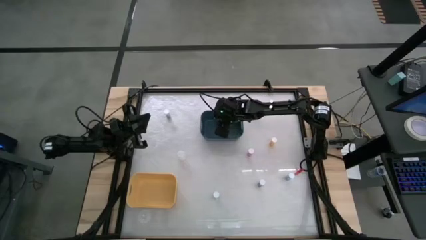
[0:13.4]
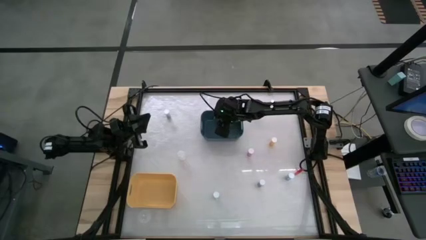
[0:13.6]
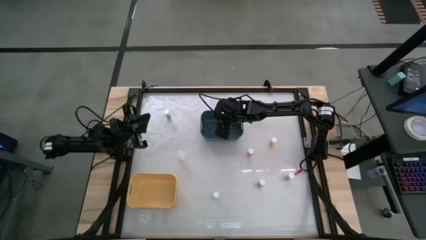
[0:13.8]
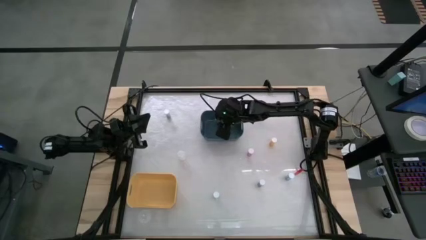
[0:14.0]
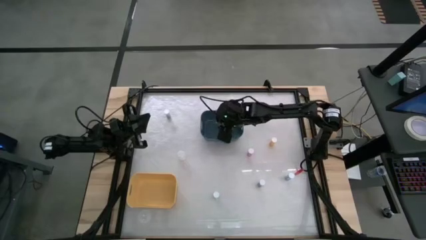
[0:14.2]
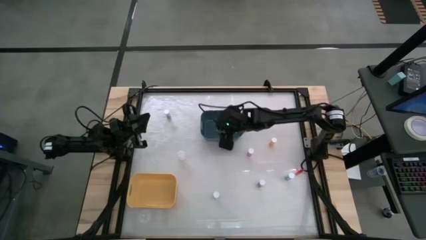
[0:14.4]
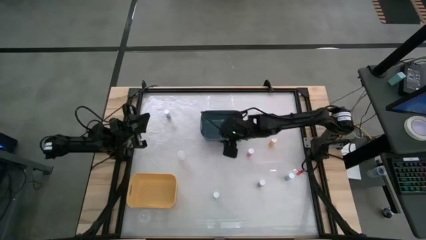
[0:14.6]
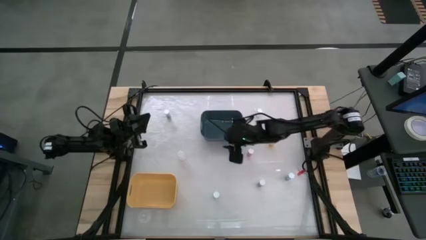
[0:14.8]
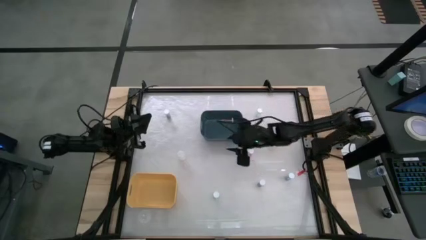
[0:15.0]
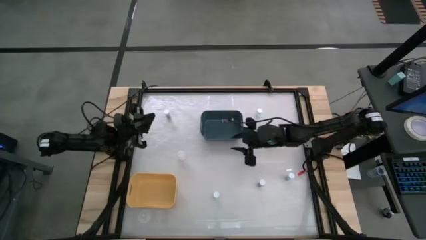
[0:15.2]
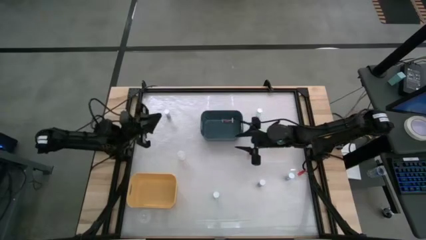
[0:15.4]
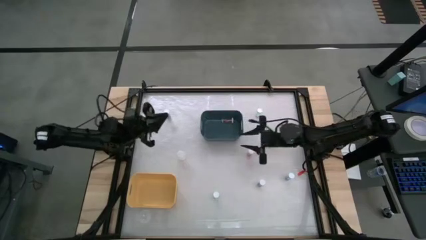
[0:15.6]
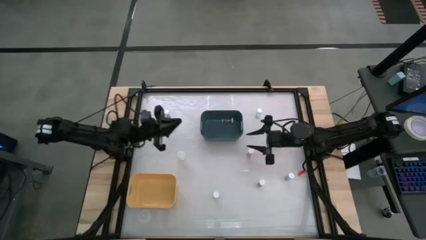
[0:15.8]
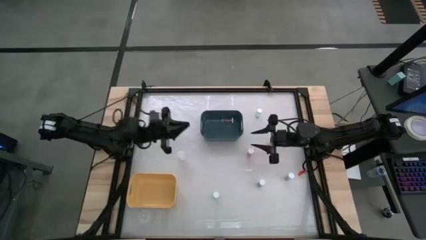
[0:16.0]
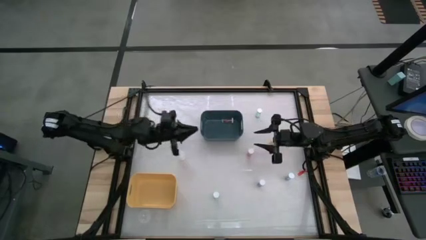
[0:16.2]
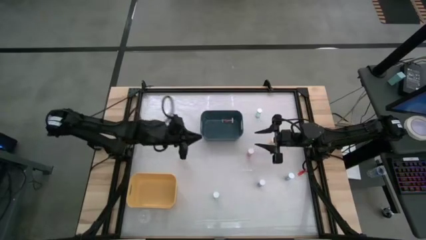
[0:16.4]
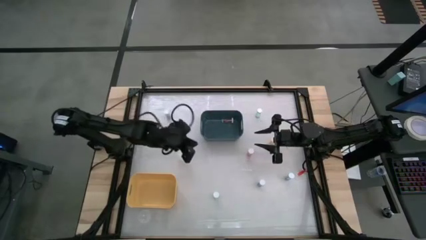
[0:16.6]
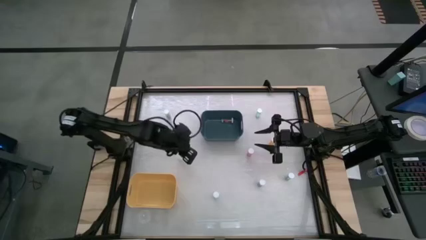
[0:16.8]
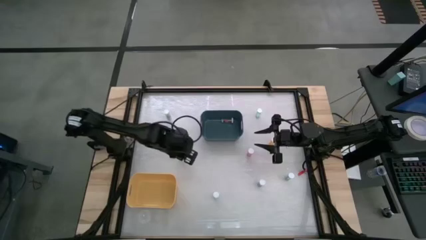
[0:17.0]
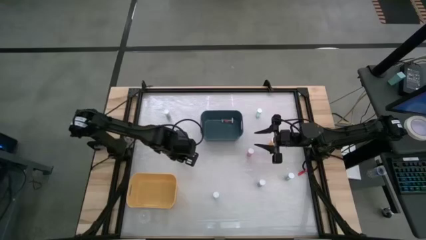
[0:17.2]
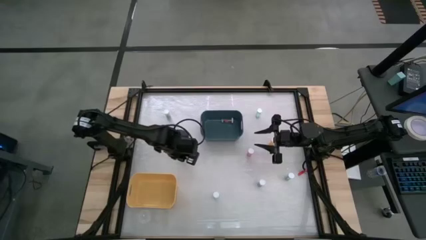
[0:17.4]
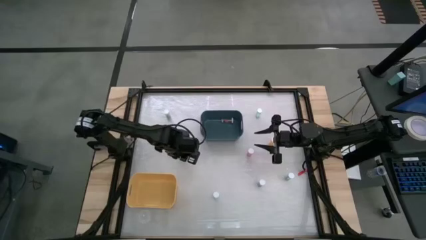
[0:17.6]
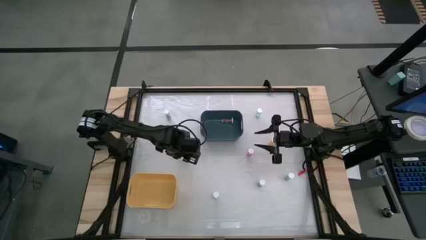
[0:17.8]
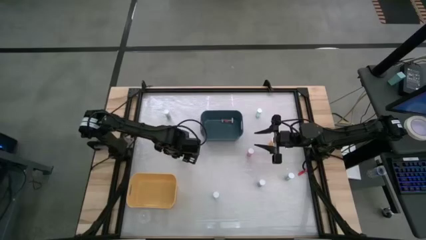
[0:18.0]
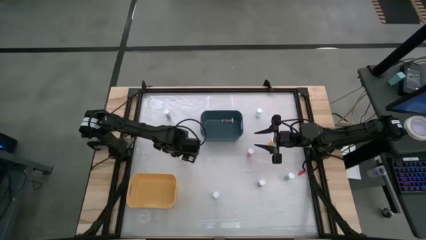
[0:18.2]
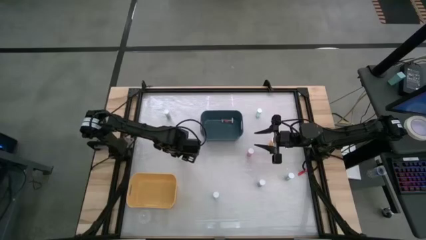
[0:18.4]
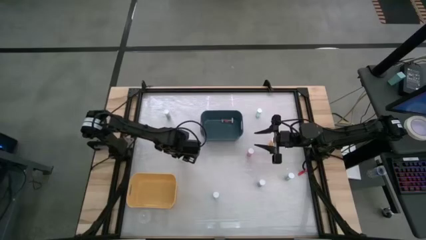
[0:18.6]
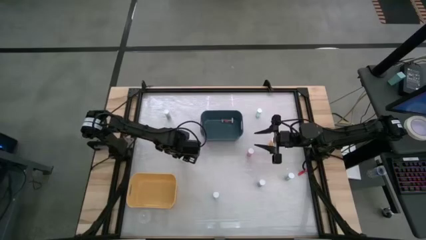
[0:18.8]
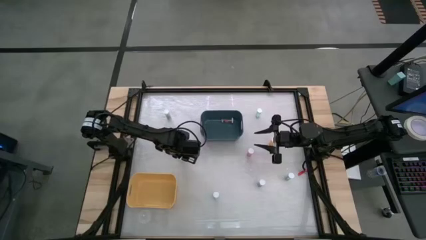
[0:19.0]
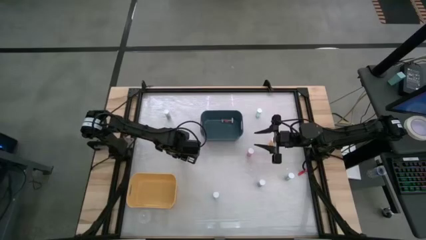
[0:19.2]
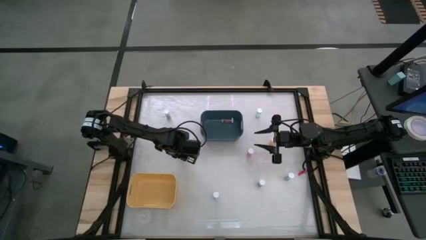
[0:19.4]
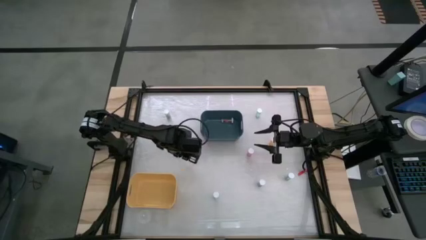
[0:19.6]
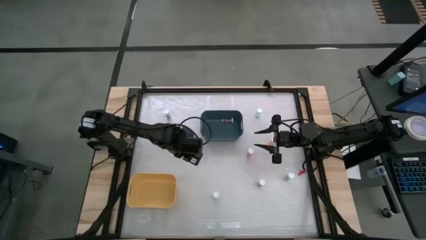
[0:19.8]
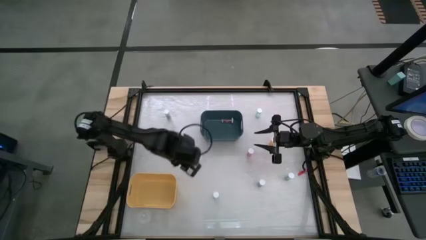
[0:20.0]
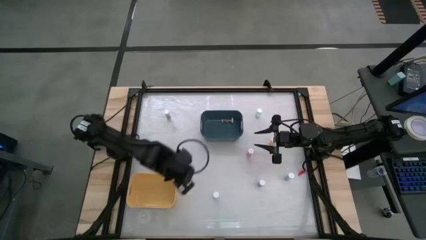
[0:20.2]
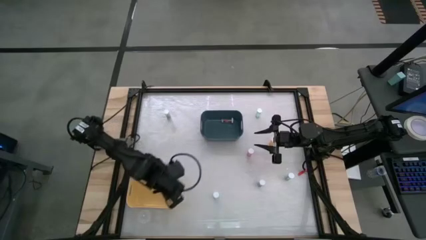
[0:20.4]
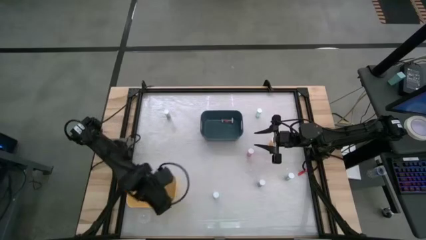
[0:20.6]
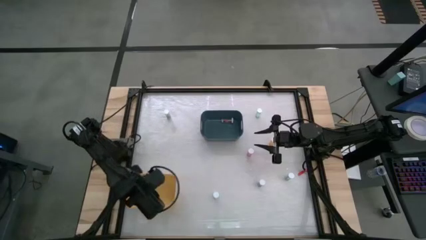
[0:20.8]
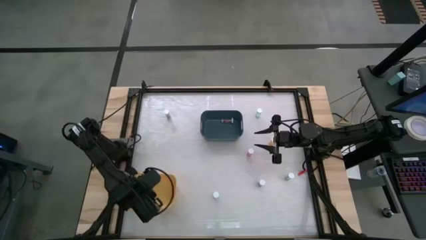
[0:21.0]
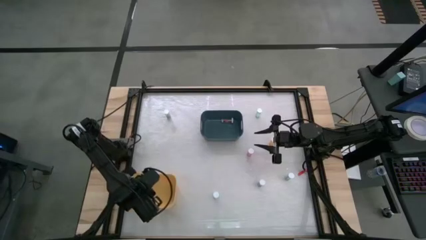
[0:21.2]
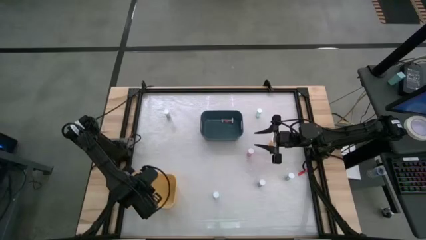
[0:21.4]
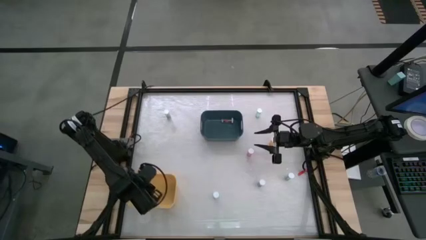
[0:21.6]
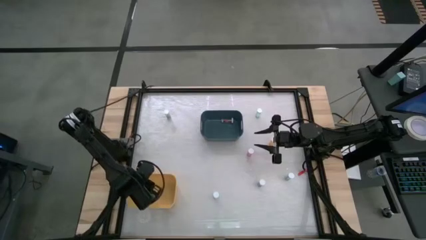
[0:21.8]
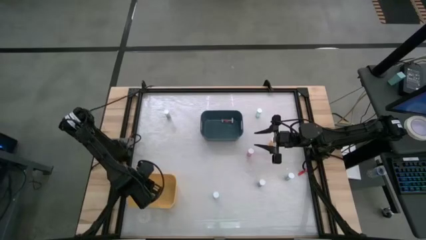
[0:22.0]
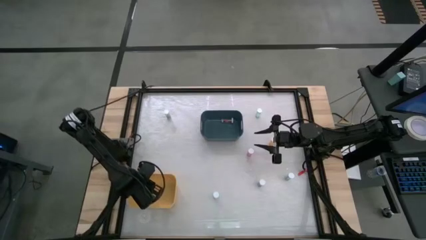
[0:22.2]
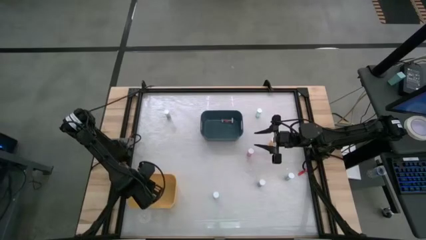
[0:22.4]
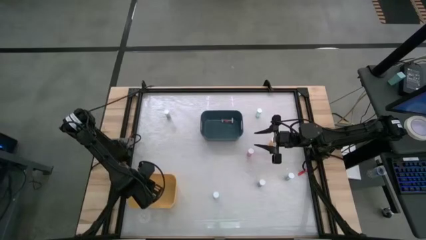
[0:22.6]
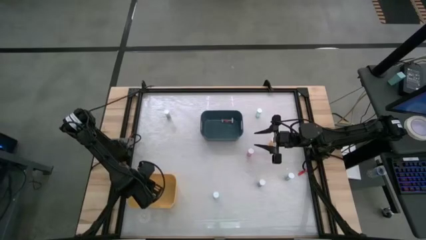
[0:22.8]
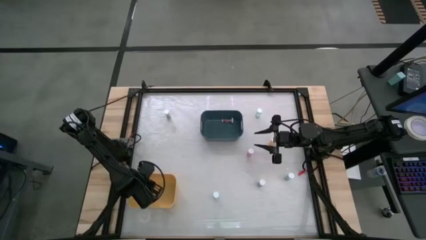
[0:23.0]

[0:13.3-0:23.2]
Task: Pick and place medicine bottles into bin by pill shape (circle, oval)
Put the white tablet bottle into the yellow bin

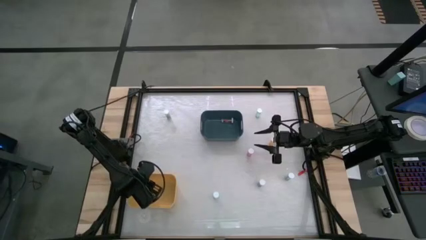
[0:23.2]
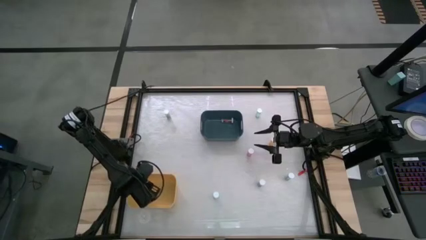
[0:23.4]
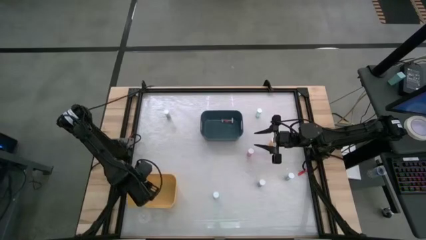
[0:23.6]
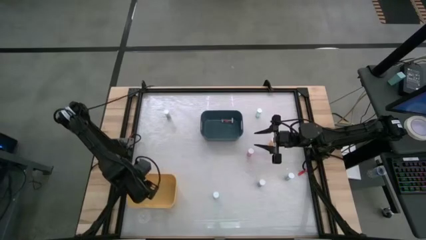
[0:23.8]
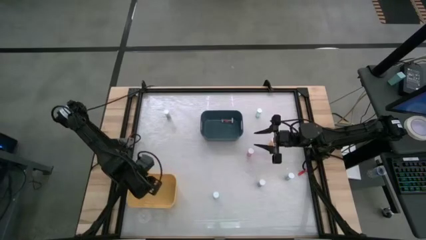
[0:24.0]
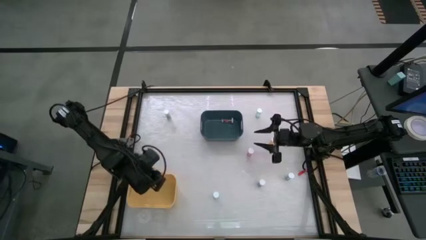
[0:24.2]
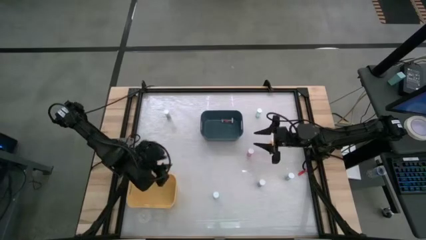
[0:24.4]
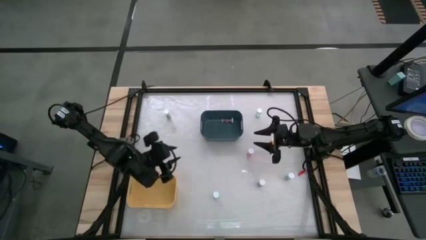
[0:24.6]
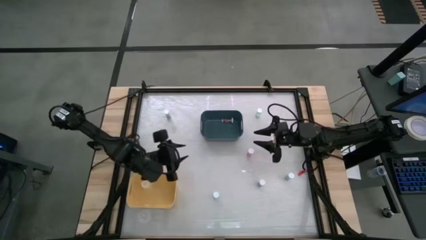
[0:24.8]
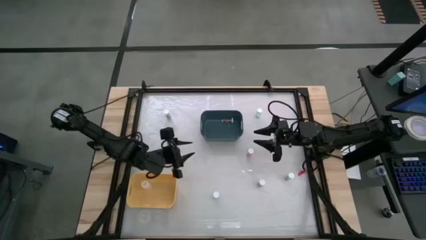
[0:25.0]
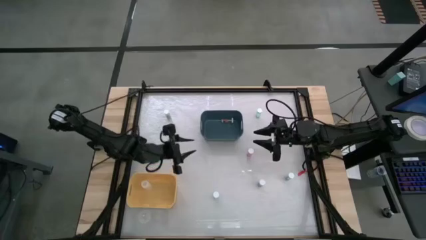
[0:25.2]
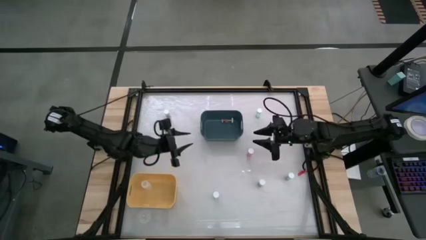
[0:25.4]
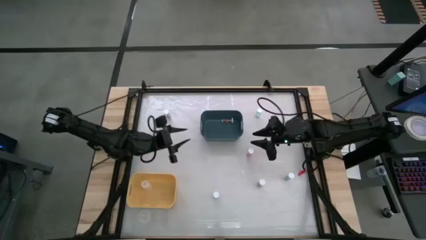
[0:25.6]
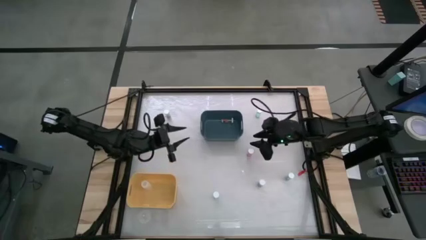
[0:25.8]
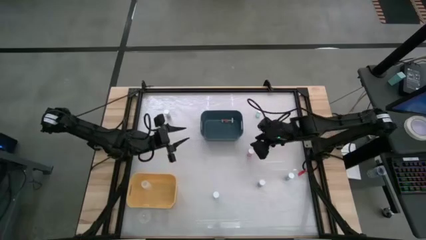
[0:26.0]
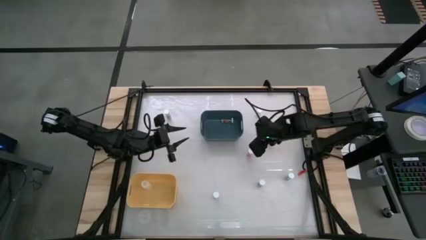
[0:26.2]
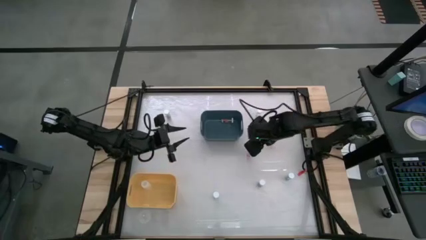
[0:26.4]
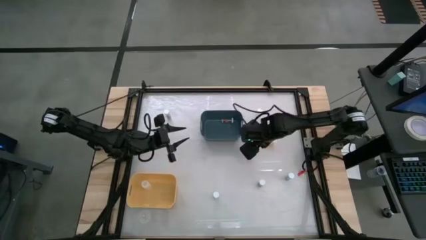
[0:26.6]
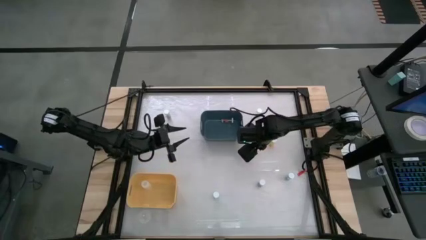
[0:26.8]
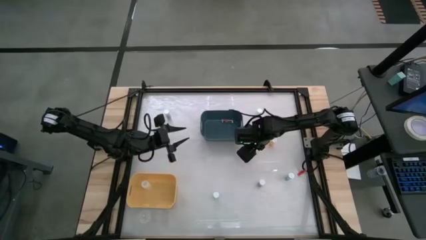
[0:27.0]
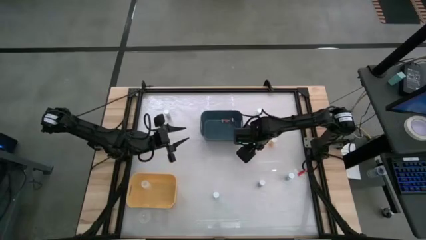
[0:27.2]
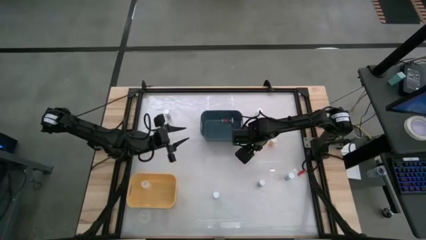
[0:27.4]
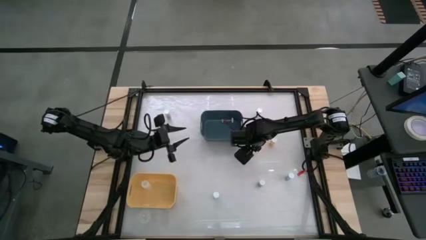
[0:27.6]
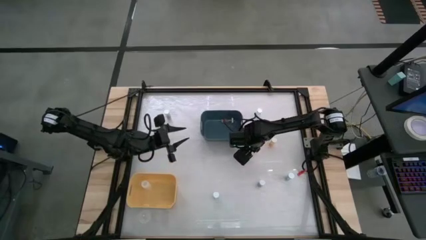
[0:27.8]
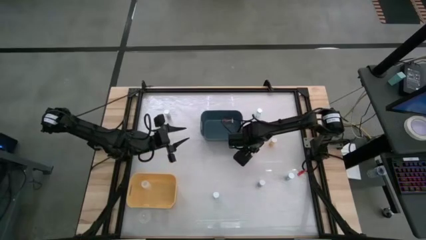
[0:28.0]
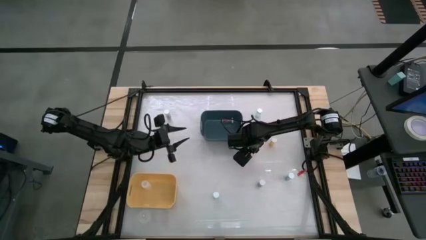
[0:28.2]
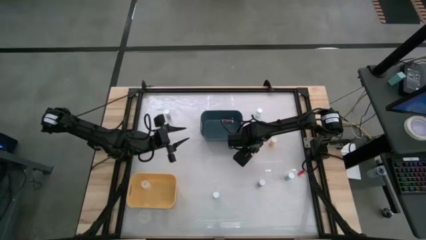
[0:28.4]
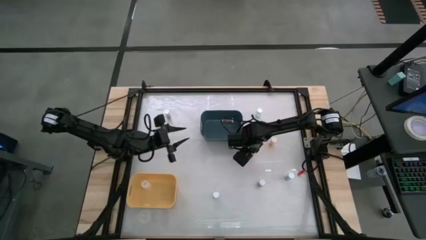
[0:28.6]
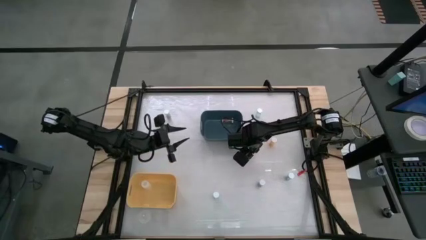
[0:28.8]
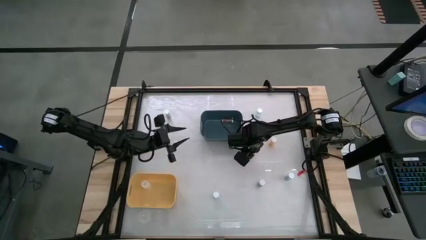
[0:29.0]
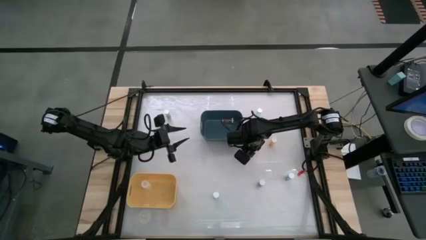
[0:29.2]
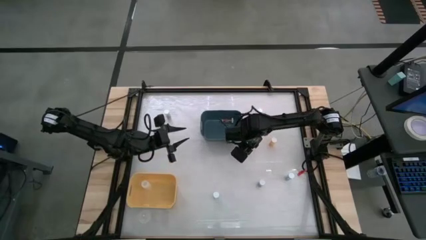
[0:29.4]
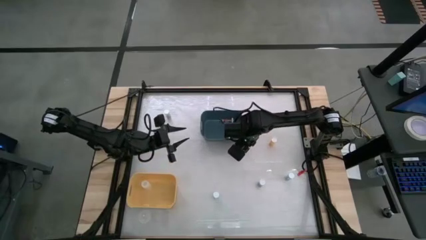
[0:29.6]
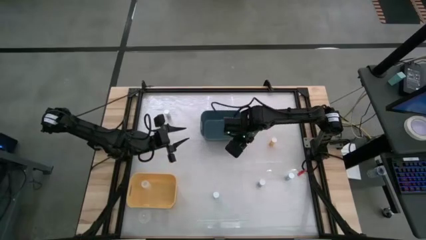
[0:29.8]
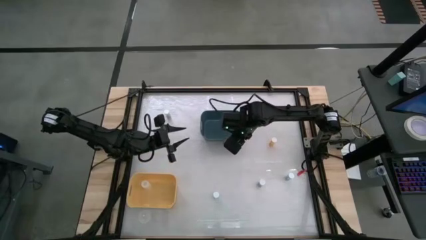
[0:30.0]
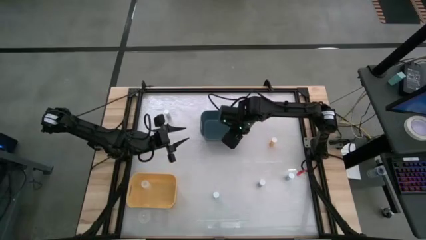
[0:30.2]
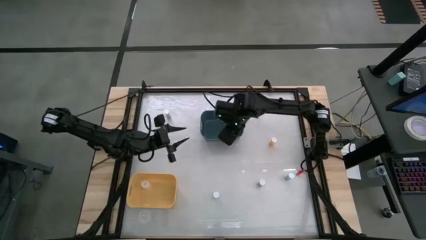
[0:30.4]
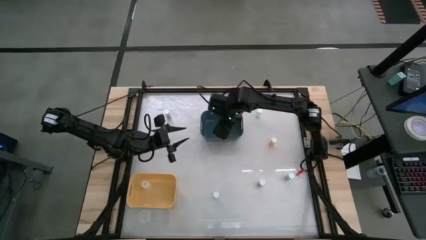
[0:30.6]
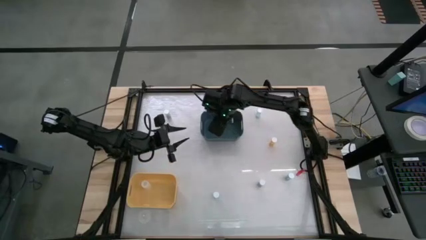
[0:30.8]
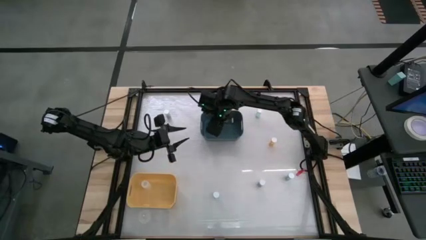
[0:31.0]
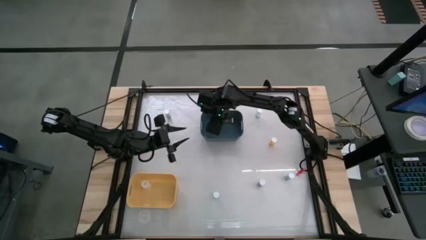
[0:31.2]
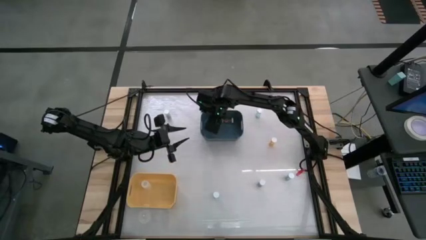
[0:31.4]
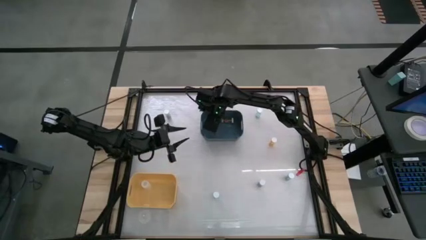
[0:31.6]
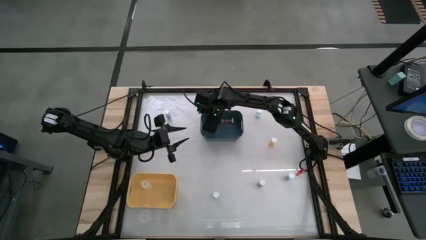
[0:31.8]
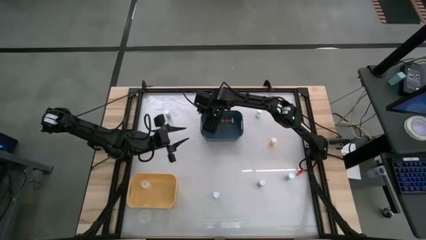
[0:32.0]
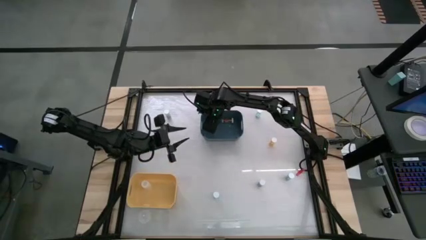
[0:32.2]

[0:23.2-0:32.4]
Put the pink capsule bottle into the blue bin
